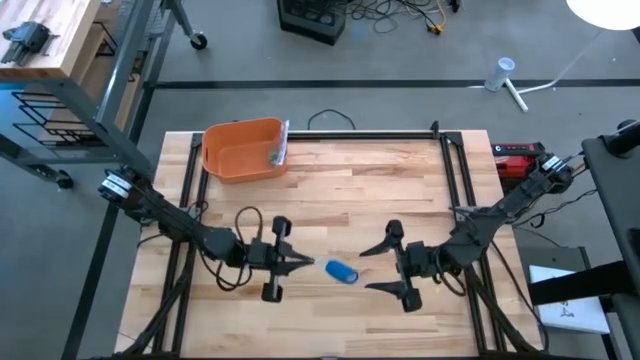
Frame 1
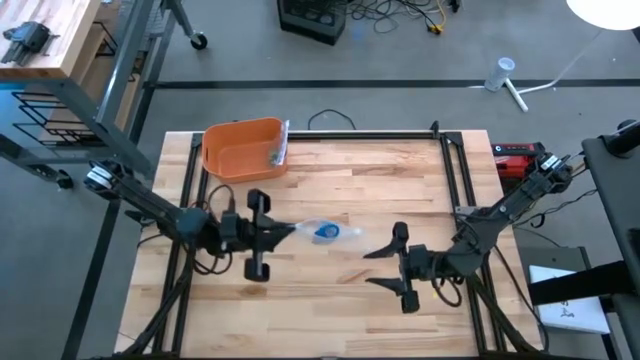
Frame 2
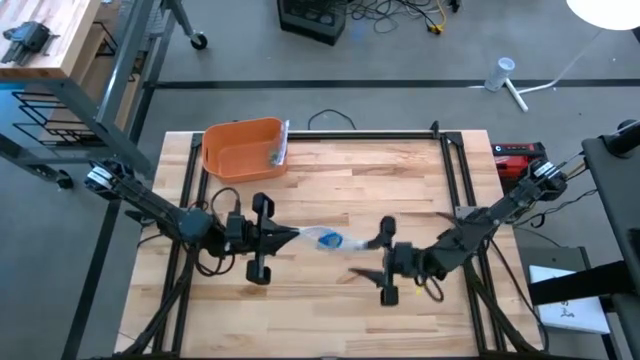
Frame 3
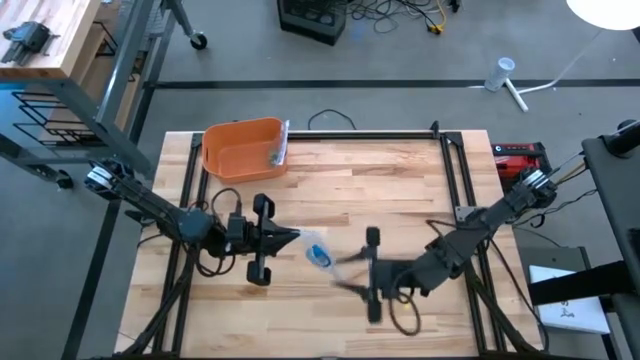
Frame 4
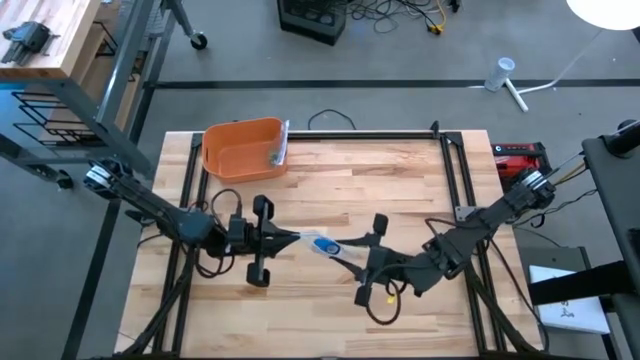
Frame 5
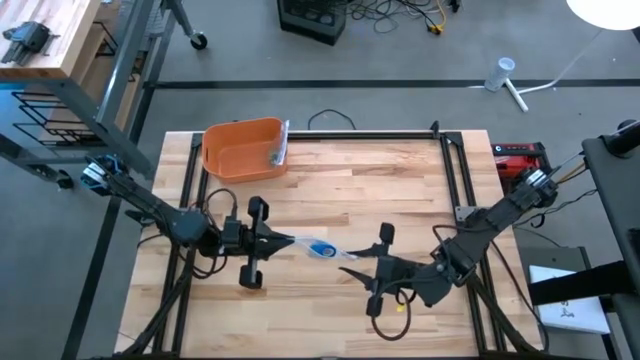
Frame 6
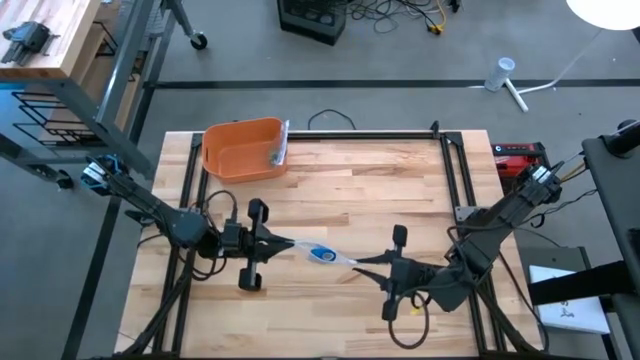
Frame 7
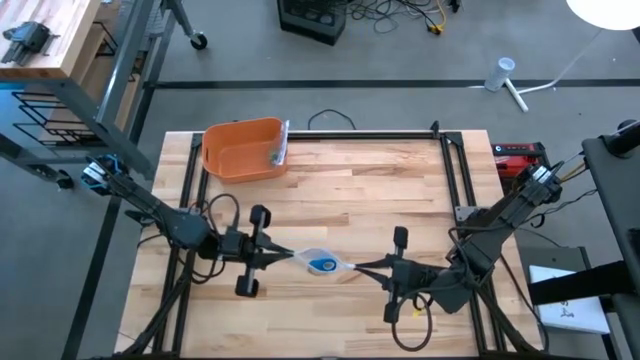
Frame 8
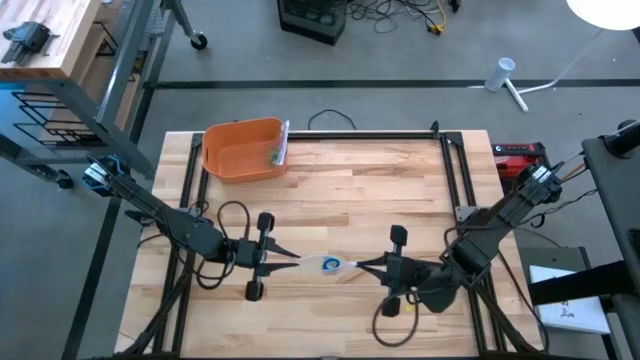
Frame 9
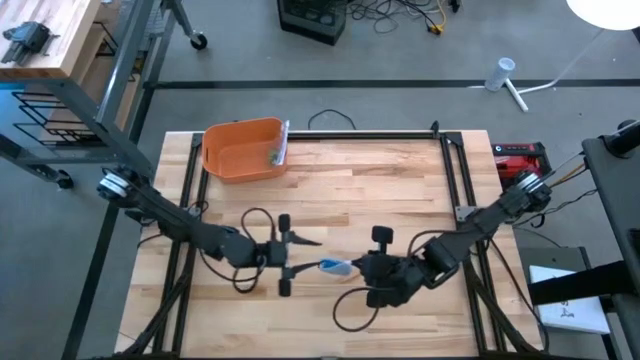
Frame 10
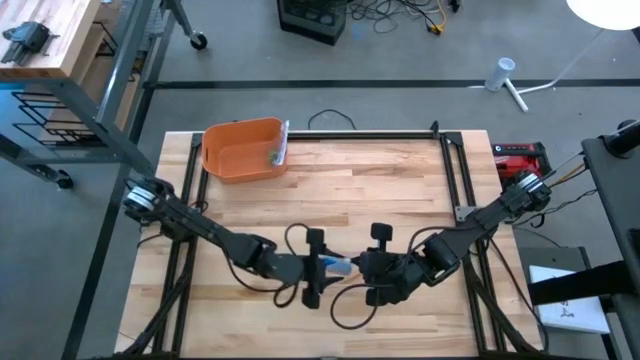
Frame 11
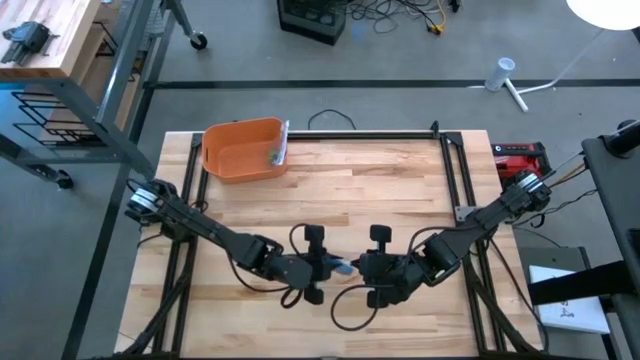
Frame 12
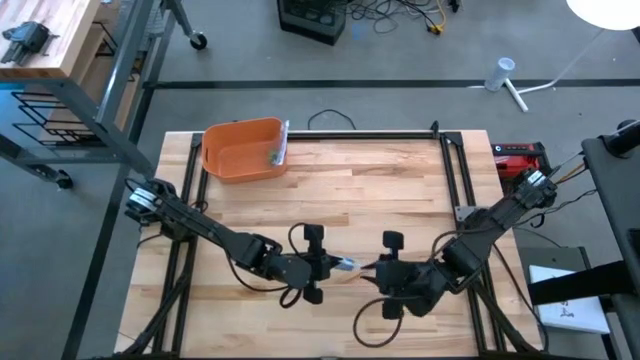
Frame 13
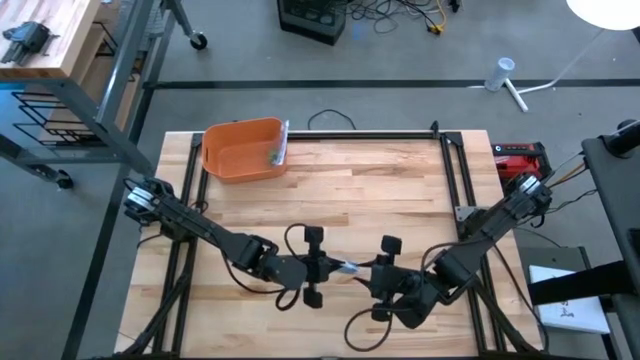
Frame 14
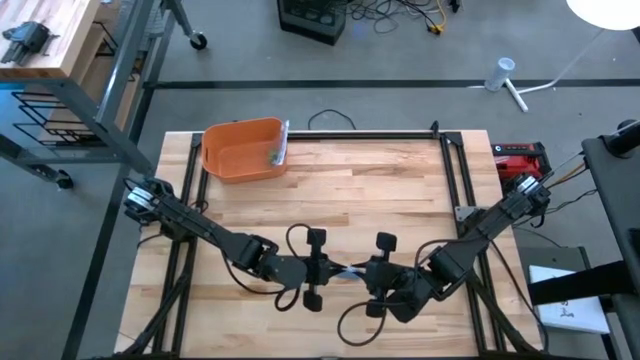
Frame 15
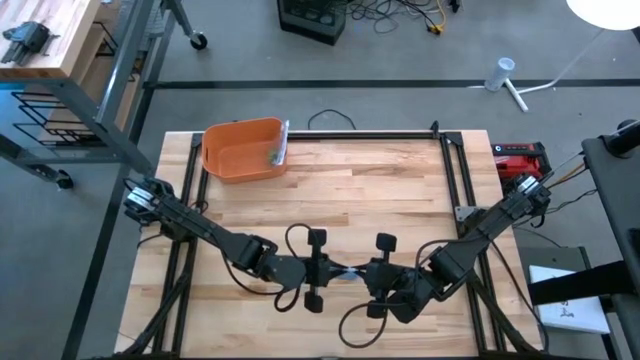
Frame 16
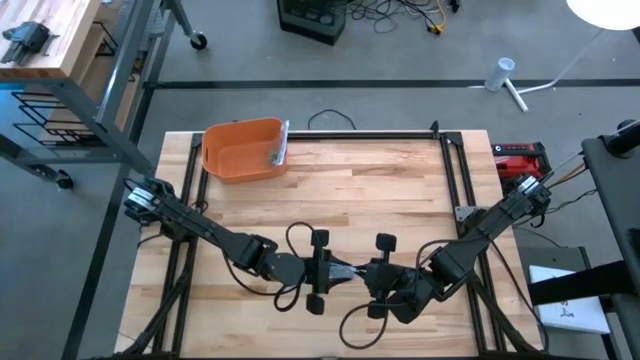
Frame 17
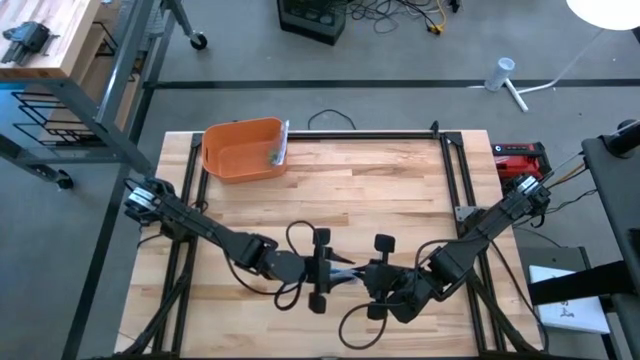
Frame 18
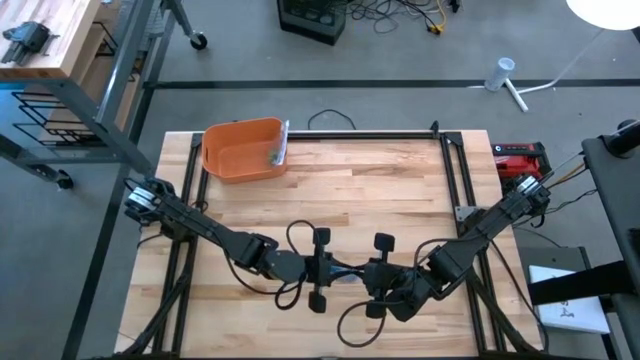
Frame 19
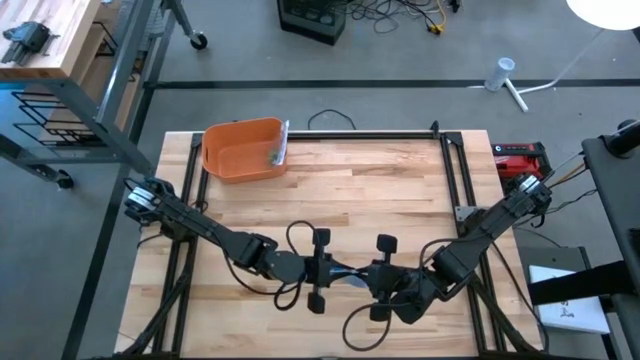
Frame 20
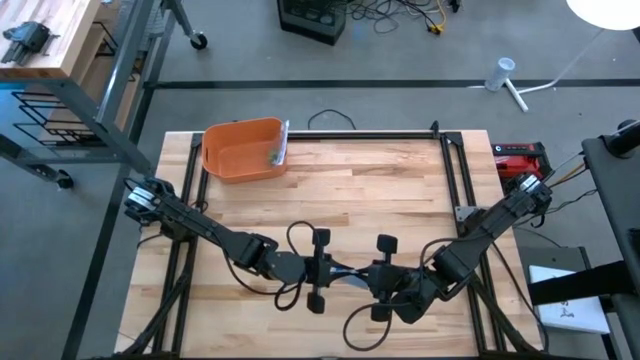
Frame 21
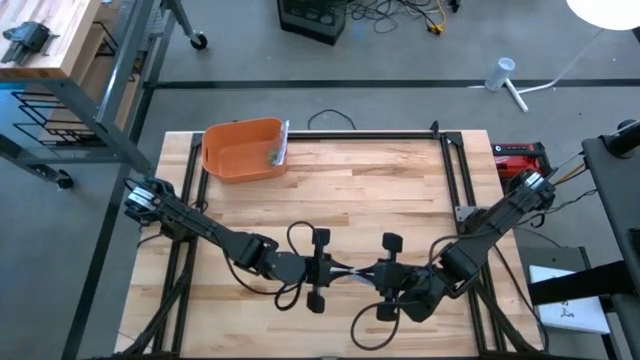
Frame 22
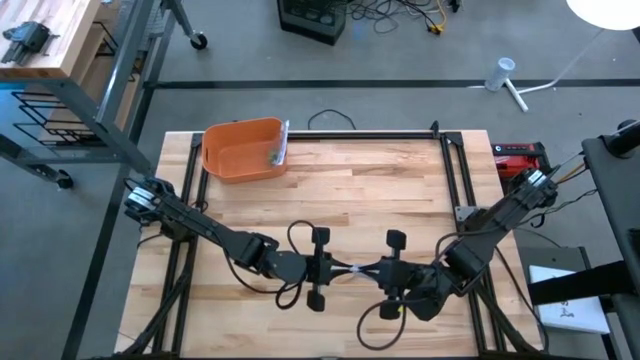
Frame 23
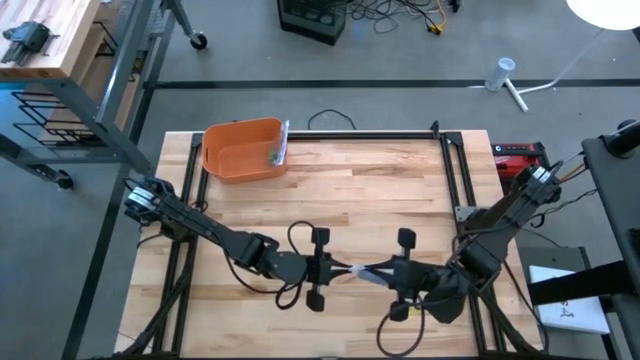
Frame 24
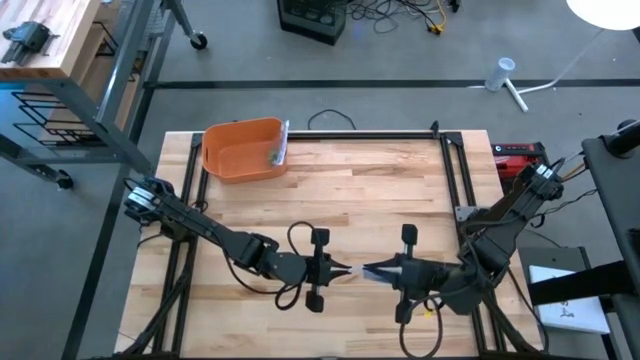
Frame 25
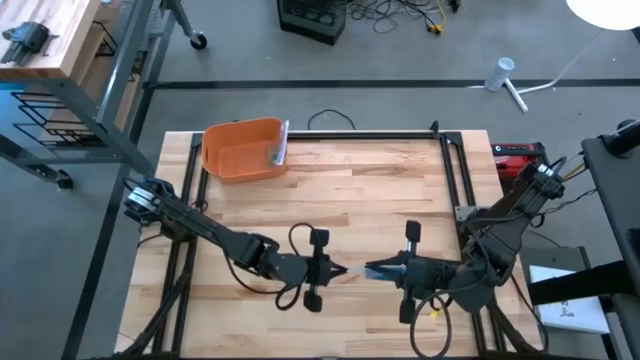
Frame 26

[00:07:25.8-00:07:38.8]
Task: Roll bandage
Close the transparent zip bag

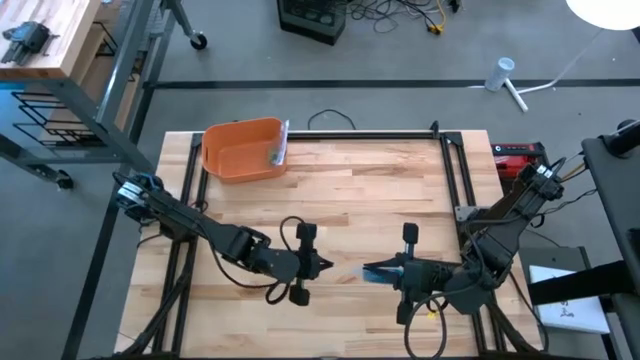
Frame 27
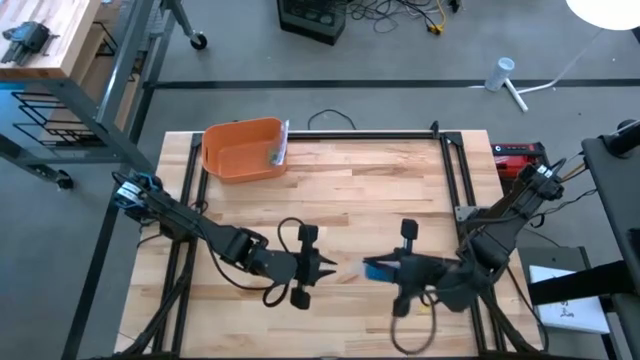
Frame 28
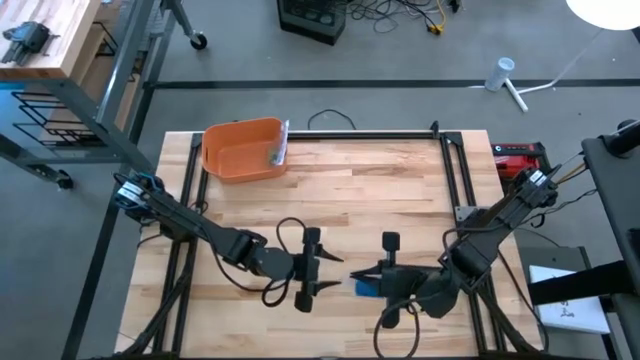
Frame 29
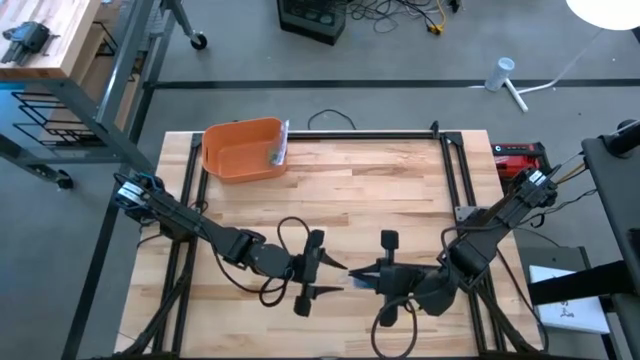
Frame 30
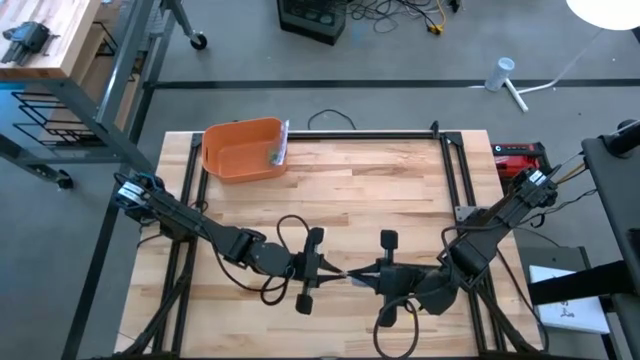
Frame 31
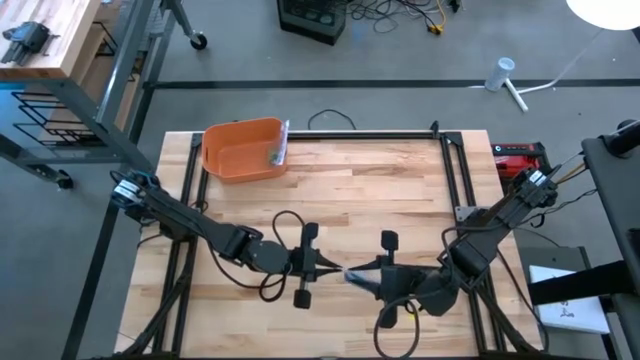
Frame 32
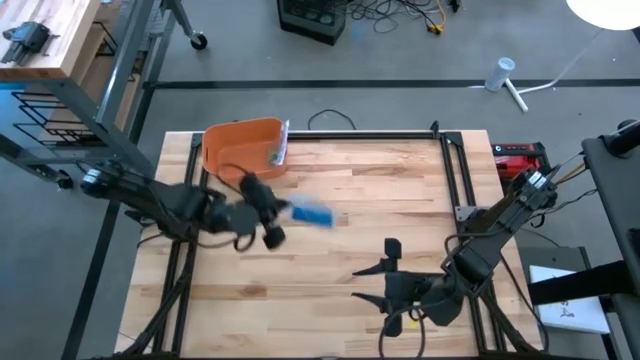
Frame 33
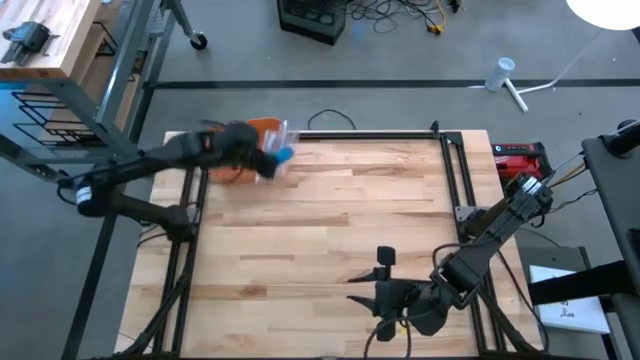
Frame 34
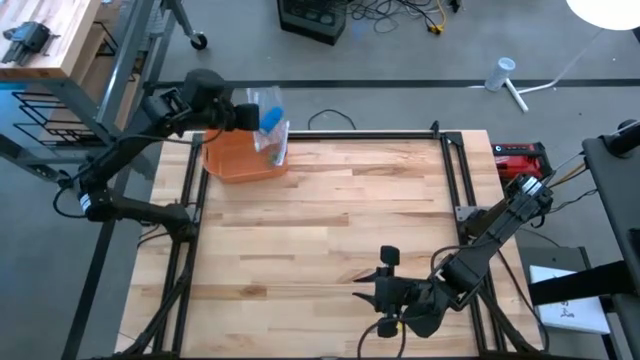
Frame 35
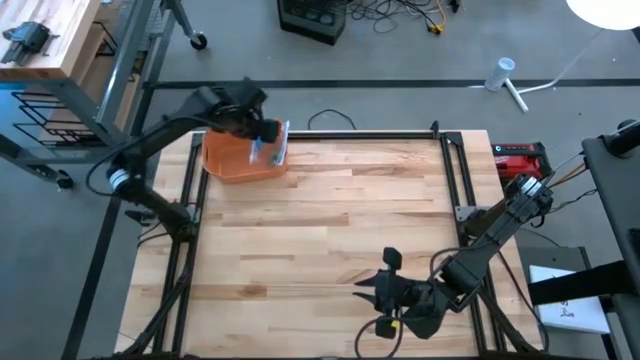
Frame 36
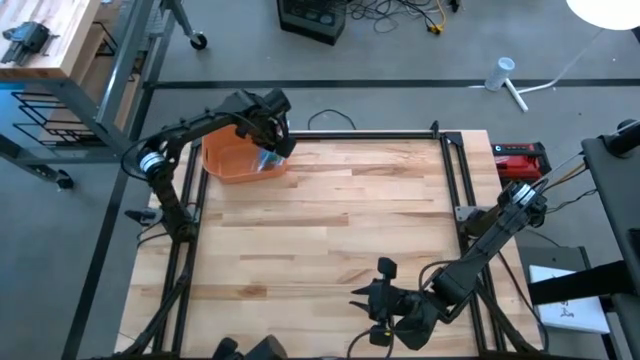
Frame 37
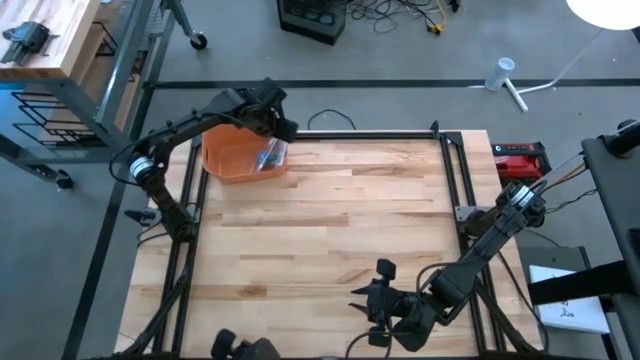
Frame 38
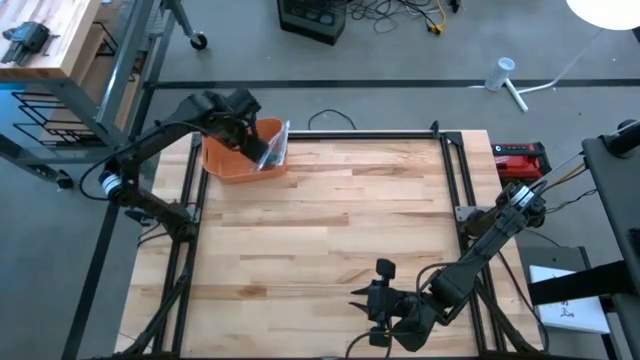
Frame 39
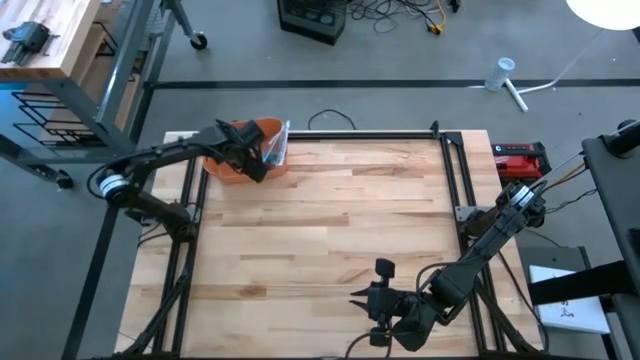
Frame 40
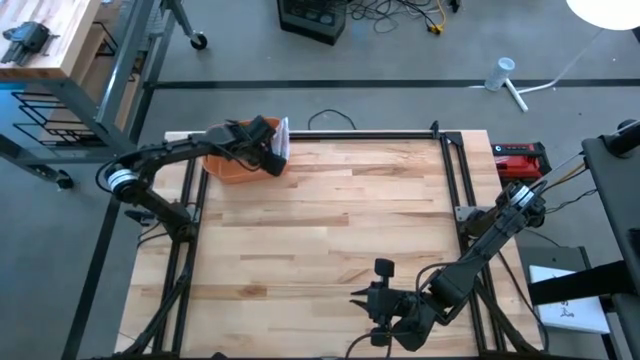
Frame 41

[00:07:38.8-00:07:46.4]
Put the transparent zip bag containing the rolled blue bandage into the orange bin

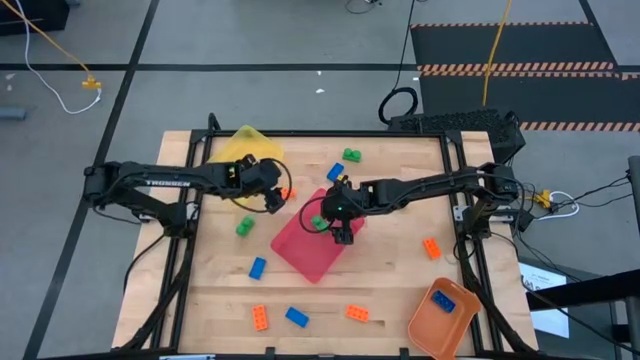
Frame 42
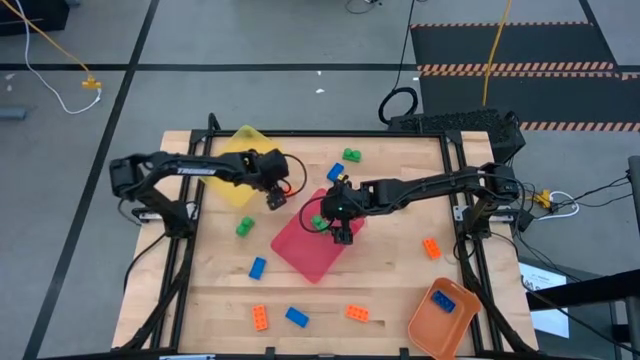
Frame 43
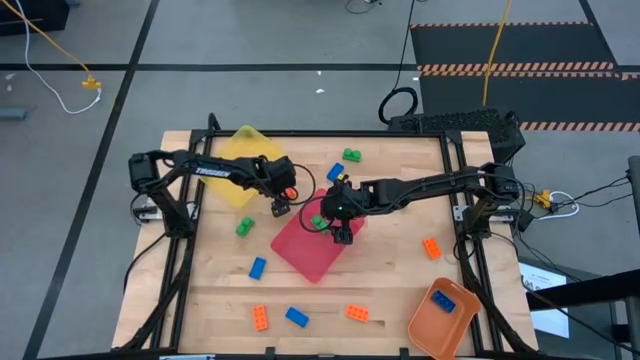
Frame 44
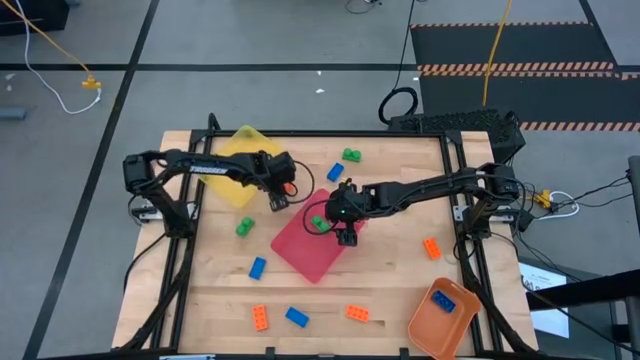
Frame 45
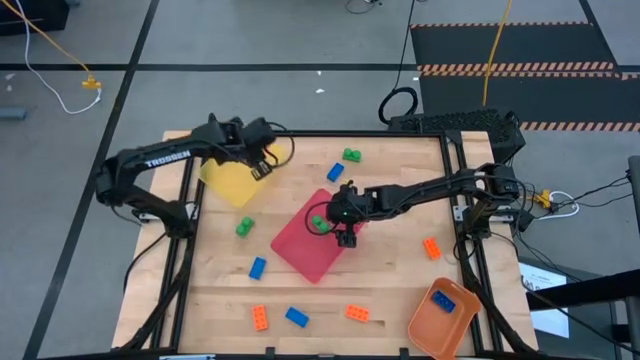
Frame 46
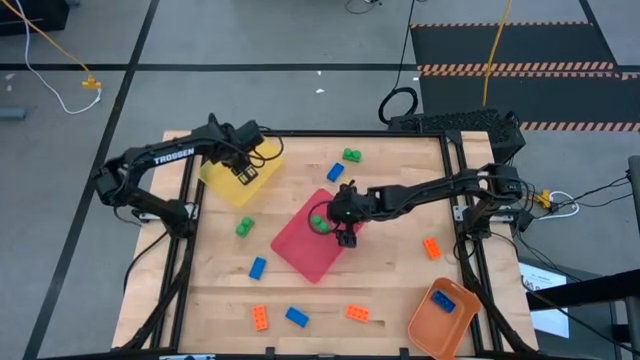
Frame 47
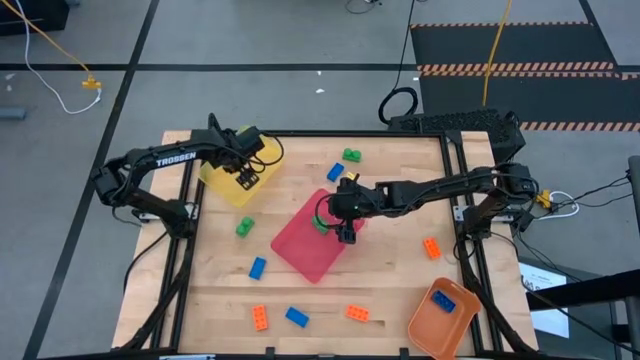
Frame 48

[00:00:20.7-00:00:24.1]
Task: Sort & place blocks by color
Put the orange game piece into the yellow bin
